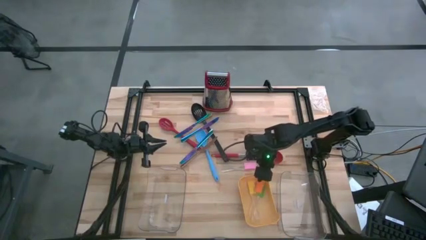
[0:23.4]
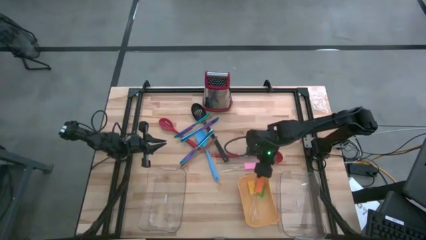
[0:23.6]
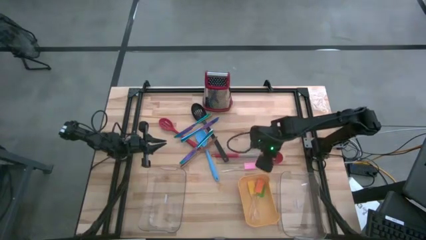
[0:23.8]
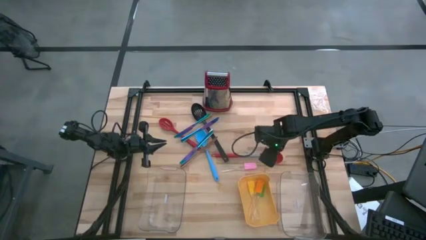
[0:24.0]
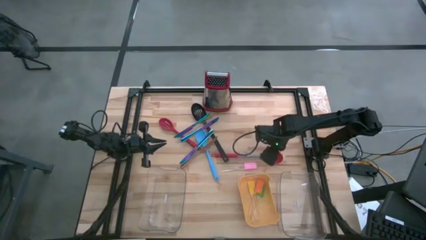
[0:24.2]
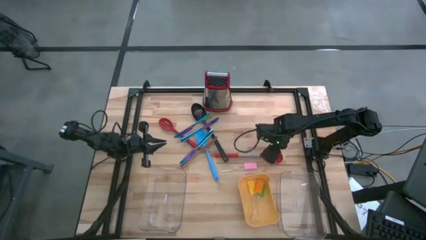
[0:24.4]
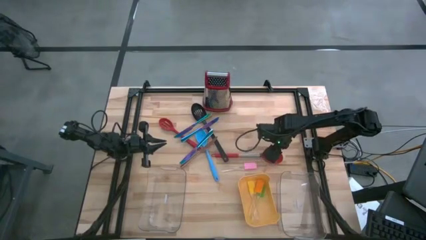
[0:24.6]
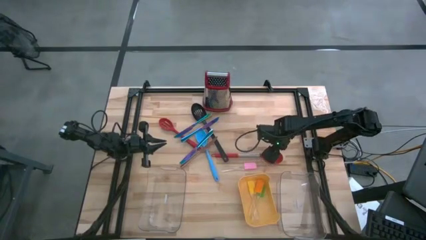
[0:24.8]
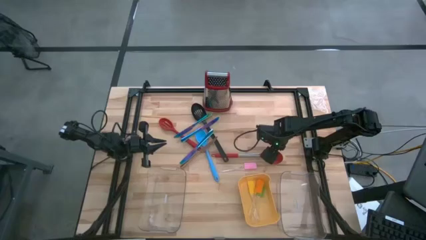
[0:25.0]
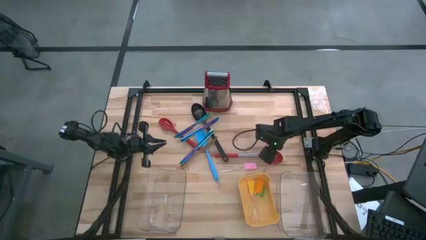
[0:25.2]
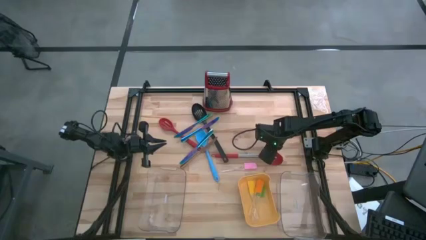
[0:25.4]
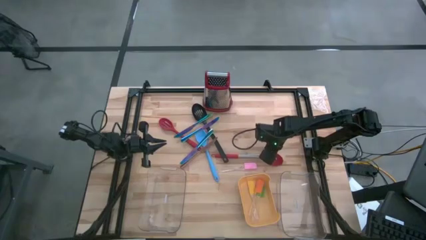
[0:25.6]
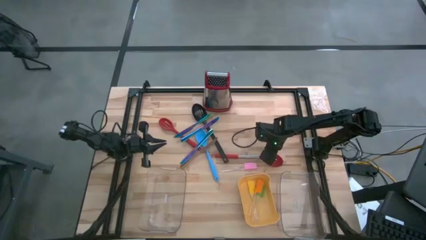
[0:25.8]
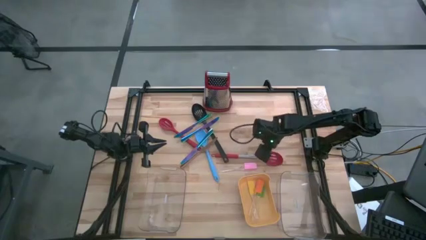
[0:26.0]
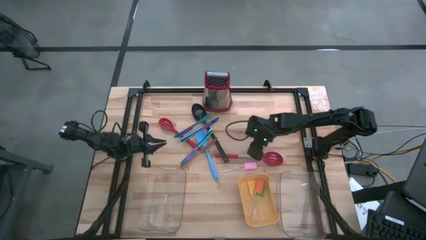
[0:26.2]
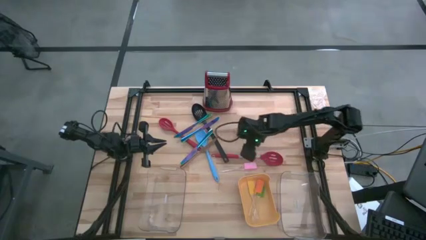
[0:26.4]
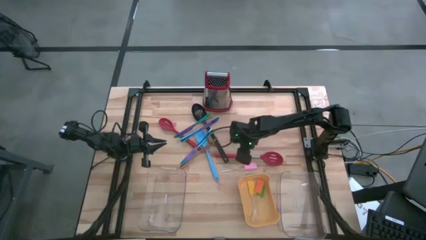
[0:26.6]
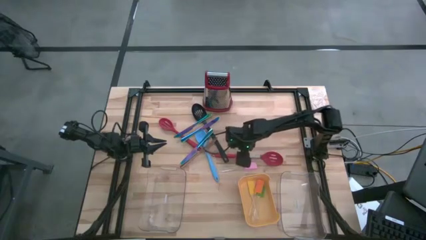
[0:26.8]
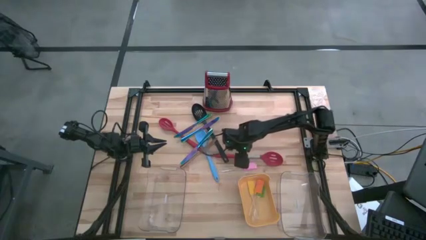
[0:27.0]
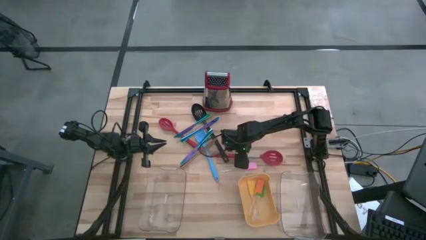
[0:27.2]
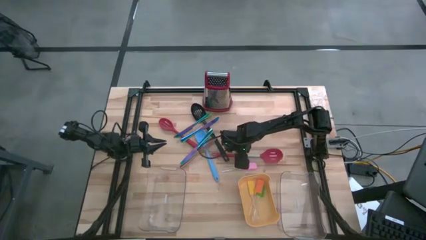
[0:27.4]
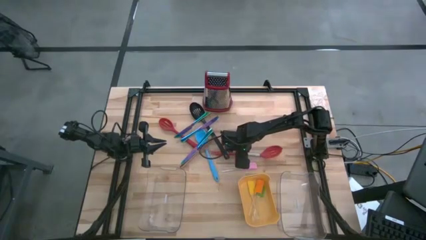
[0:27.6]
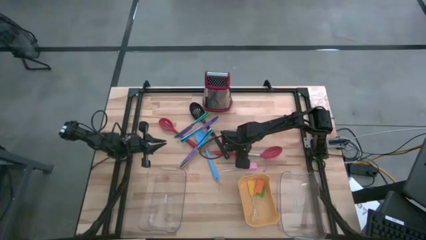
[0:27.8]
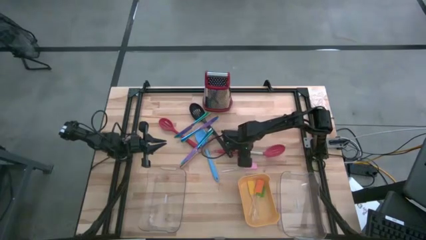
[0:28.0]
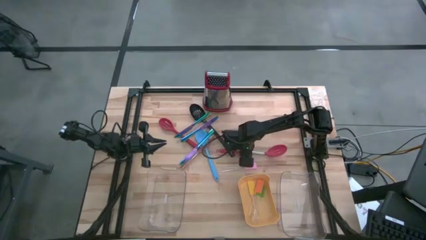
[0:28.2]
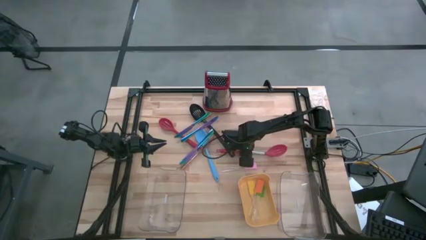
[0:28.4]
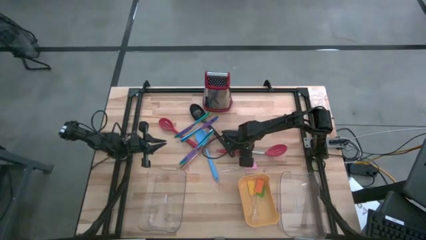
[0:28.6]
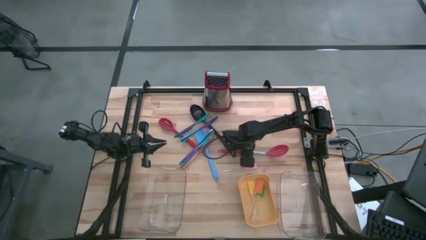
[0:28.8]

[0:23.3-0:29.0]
Task: Pick & Place Kitchen Items
Adjust the right red serving spoon

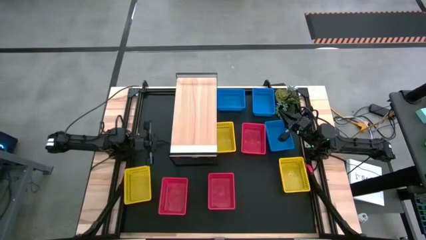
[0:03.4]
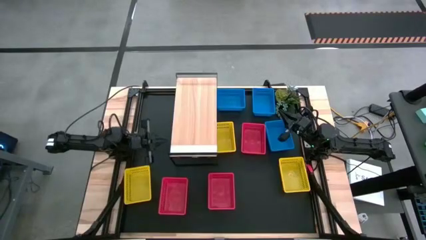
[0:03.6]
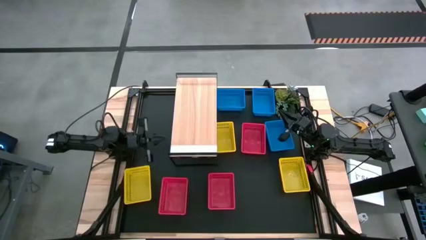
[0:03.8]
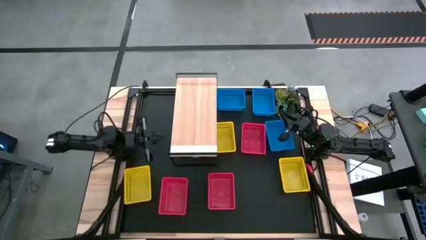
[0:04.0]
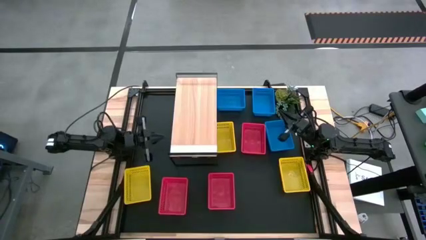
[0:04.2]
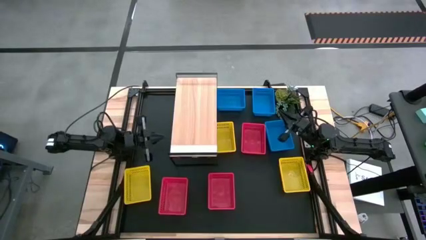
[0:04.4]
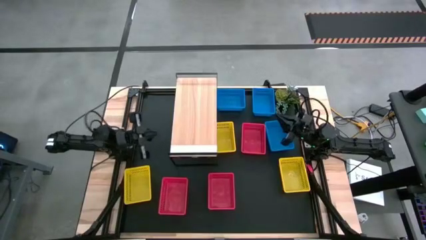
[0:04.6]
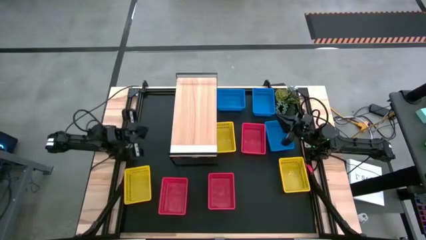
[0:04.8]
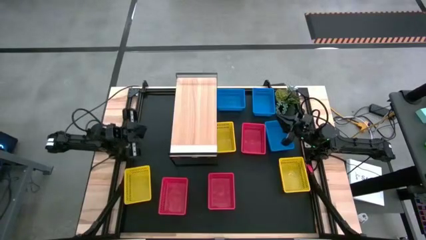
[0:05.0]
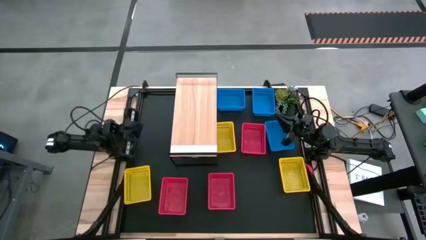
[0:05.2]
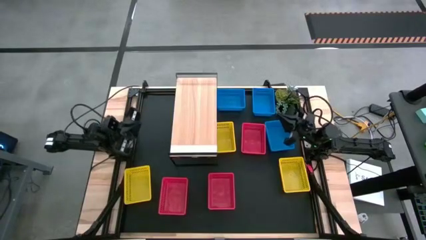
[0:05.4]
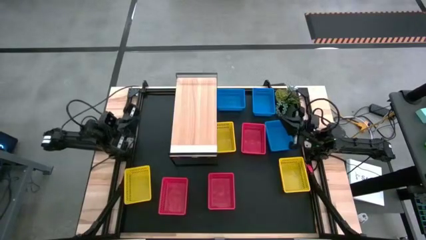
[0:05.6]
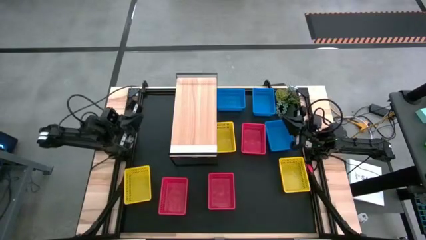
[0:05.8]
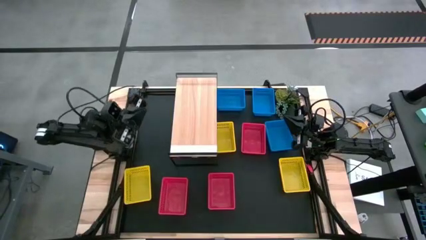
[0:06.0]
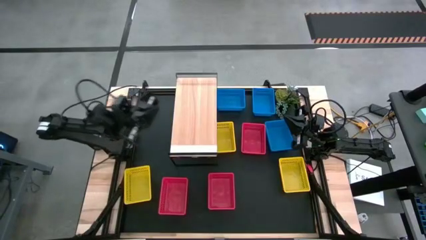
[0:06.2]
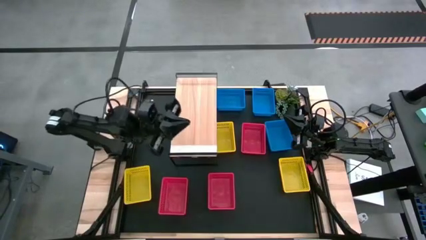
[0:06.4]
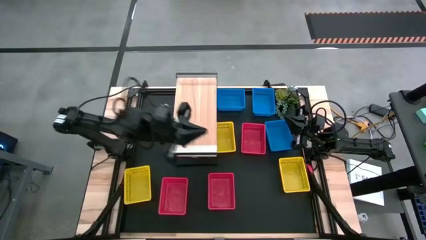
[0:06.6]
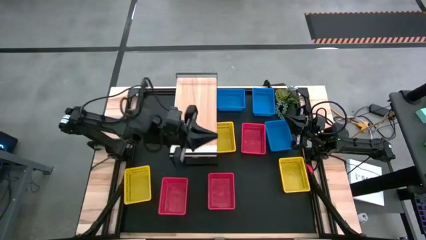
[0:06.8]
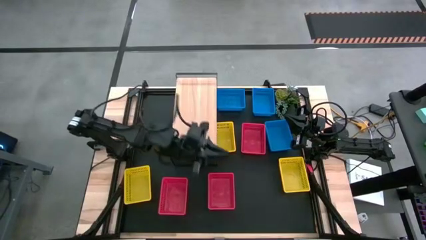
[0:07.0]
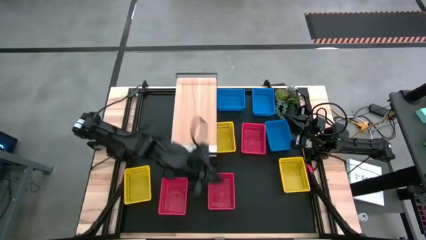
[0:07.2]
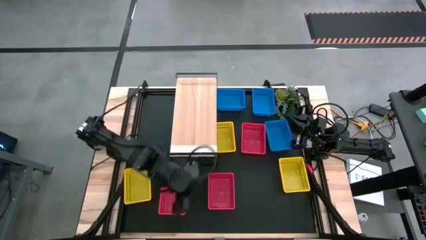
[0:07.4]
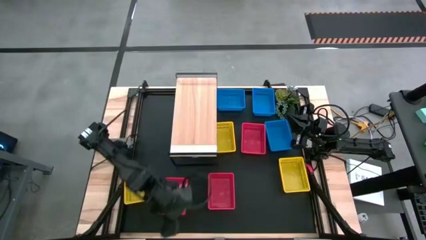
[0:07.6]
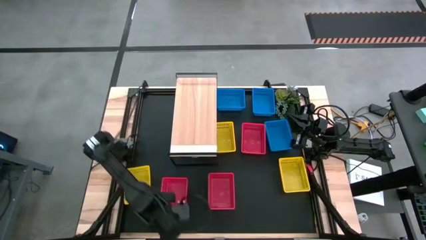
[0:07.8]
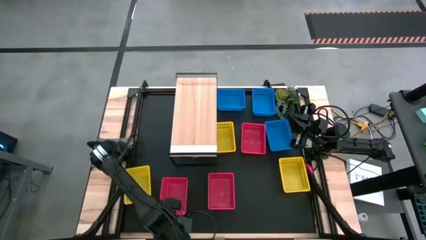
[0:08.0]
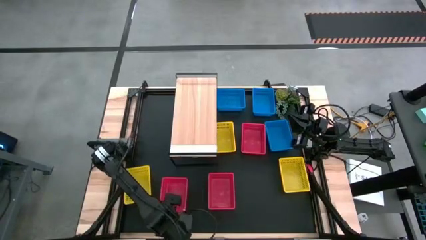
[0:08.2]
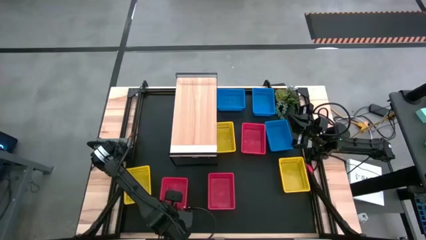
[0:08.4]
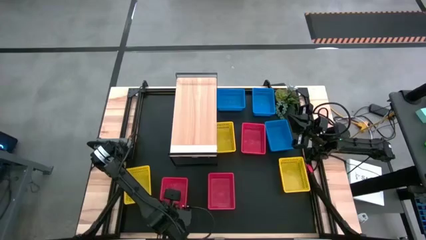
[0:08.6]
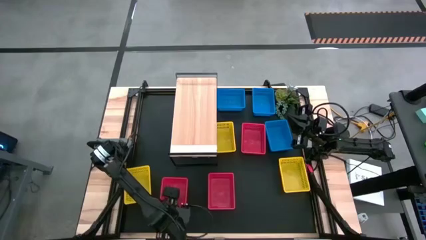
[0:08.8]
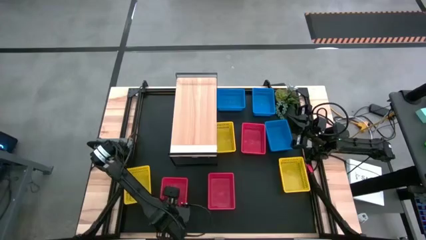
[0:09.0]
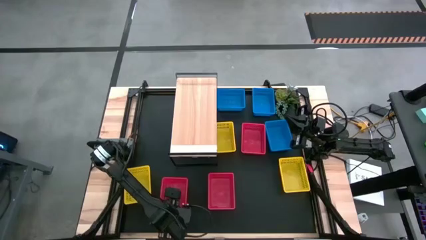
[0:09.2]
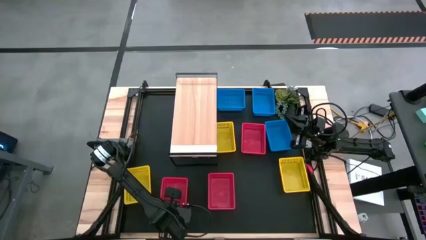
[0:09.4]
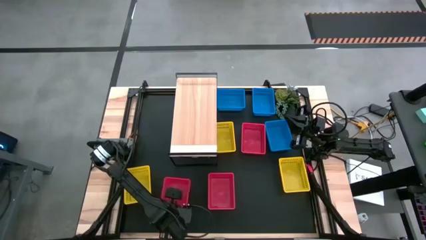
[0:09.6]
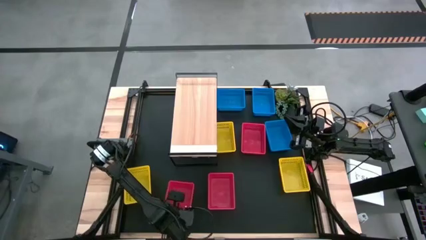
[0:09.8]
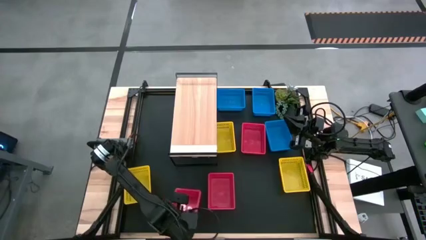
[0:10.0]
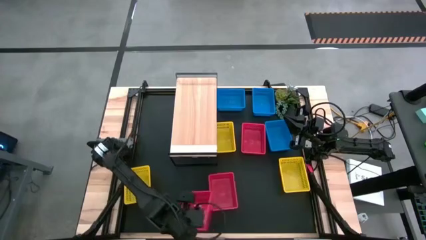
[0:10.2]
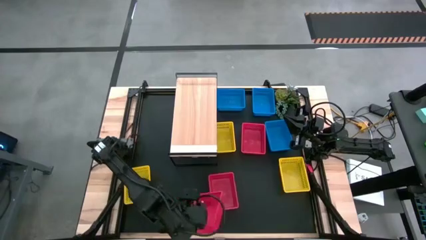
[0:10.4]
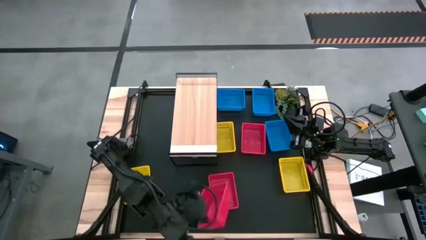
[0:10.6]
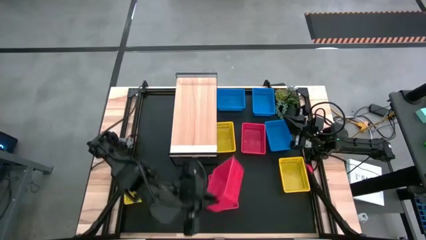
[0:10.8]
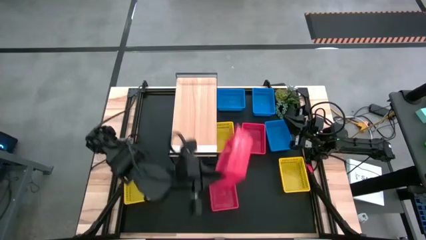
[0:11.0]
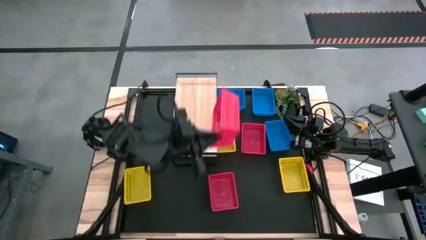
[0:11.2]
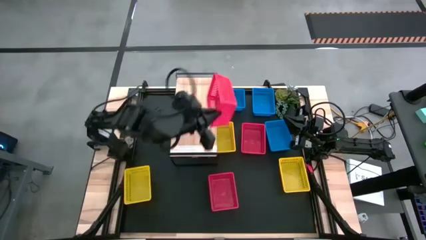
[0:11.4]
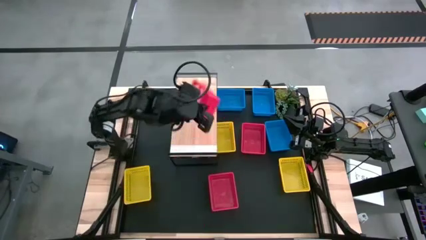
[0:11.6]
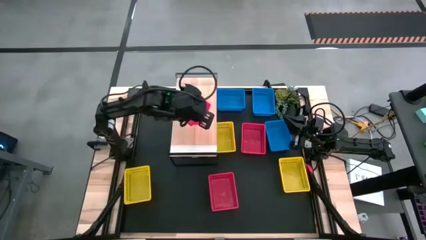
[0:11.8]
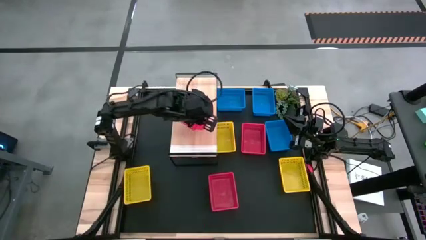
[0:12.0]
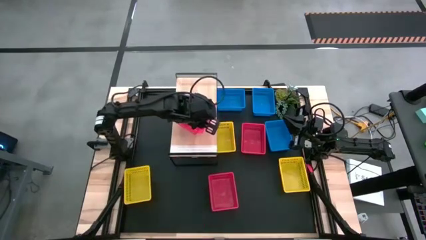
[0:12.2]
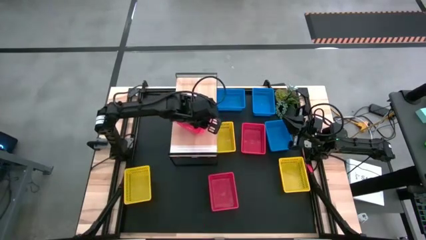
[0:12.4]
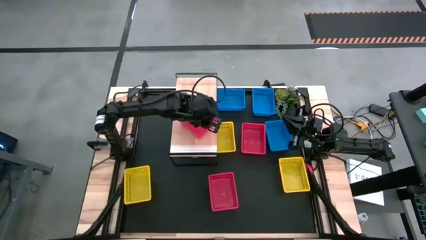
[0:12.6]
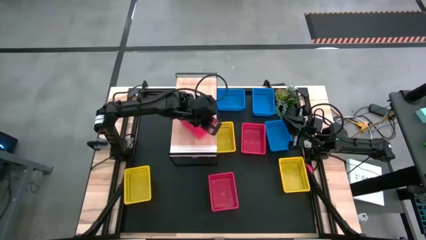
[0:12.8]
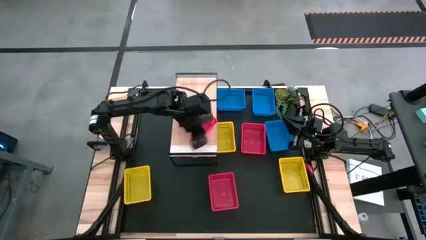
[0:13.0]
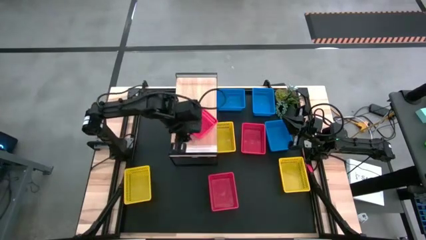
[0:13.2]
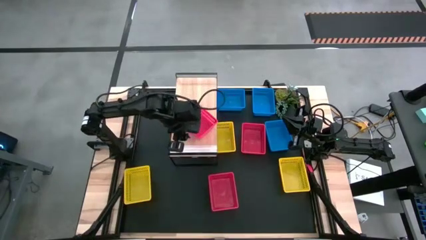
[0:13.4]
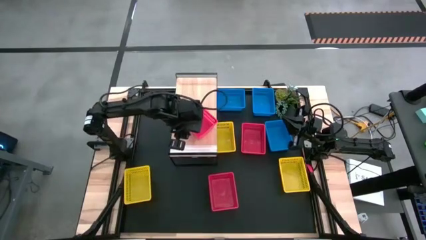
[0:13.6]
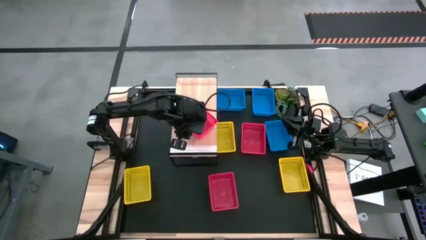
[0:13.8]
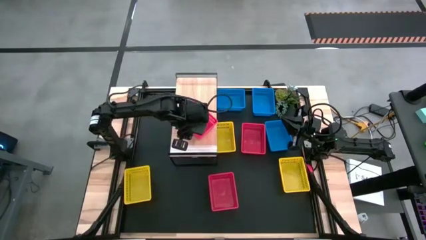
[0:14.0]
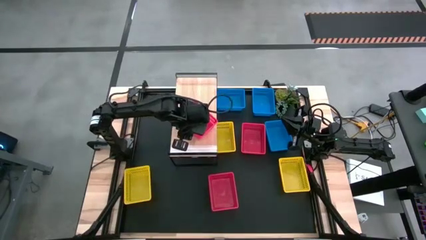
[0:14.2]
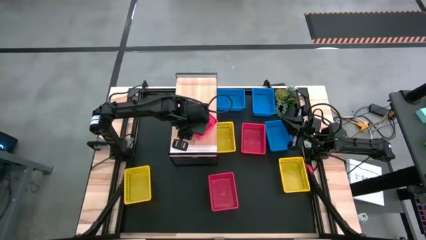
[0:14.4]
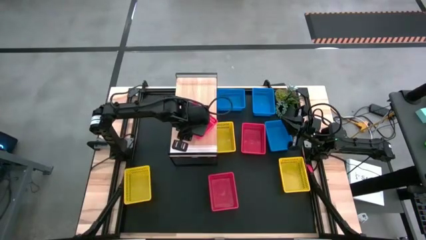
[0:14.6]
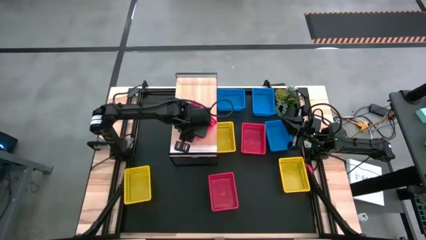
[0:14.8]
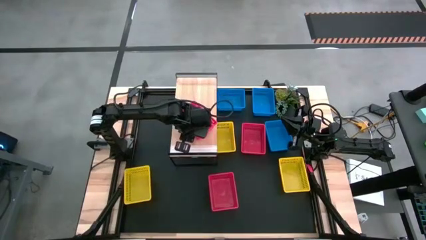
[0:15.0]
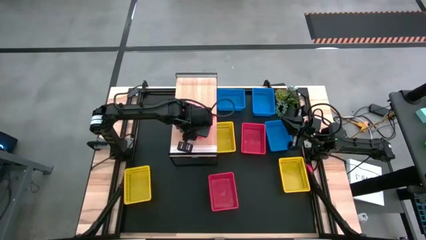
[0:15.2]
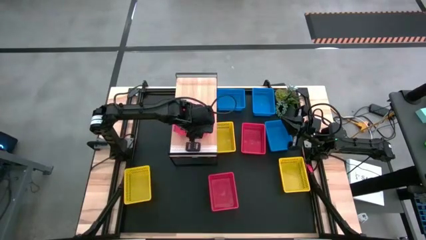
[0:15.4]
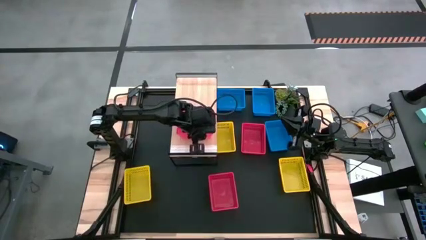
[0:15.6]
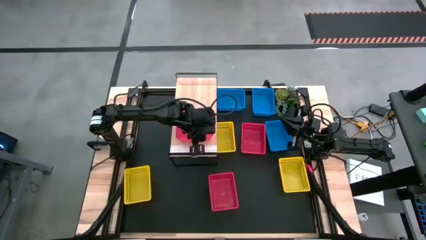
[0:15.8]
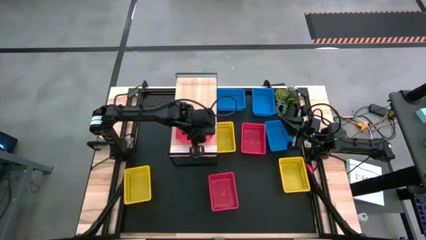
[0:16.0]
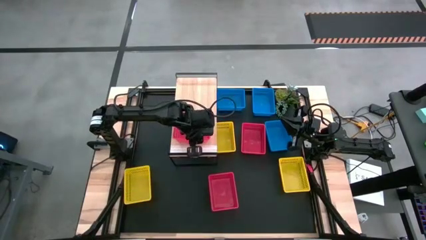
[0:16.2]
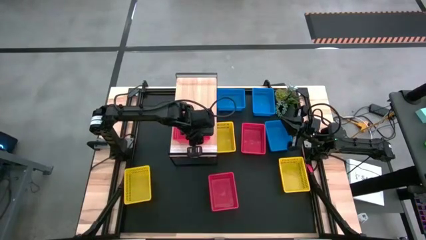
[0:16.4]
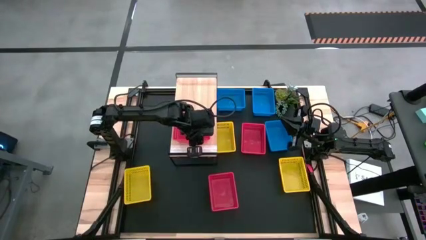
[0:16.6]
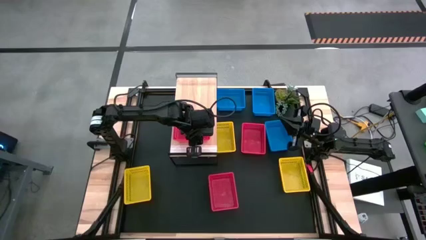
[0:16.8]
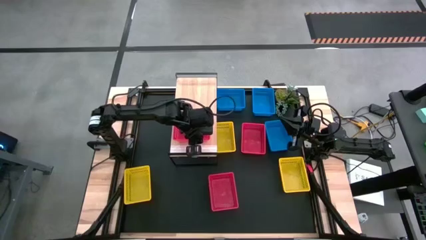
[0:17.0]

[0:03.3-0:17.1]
Task: Stack baskets on shelf by color
Put the bottom left red bin on the shelf
